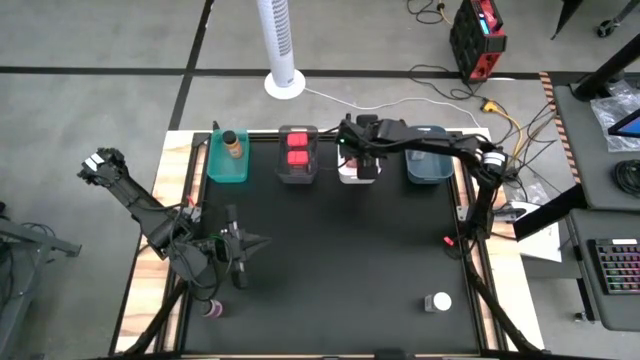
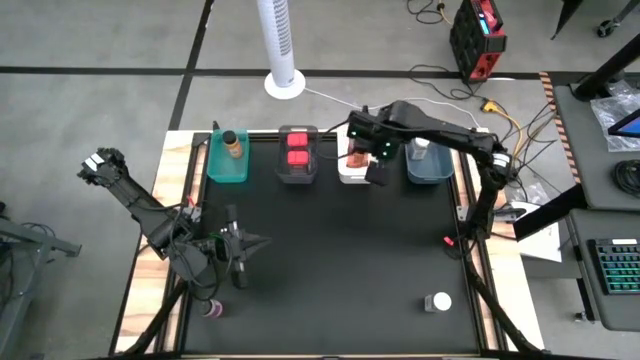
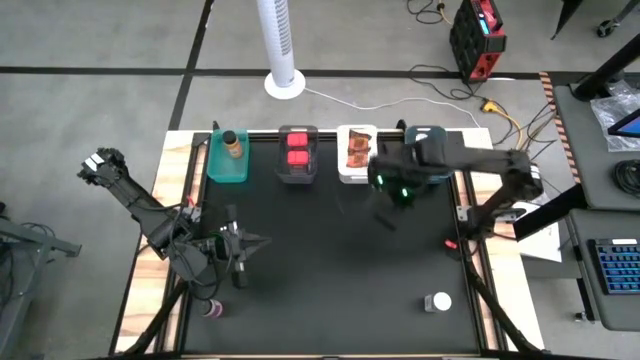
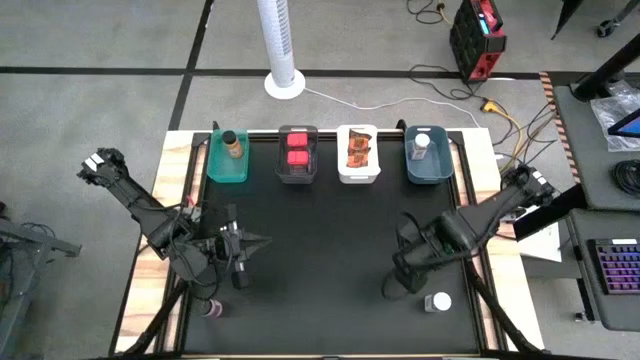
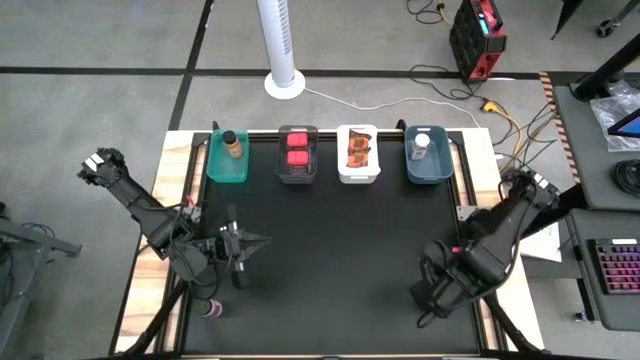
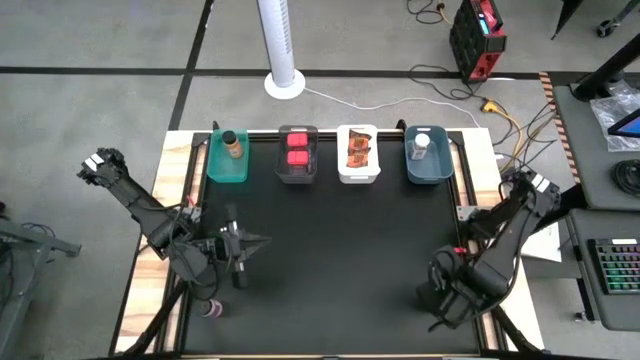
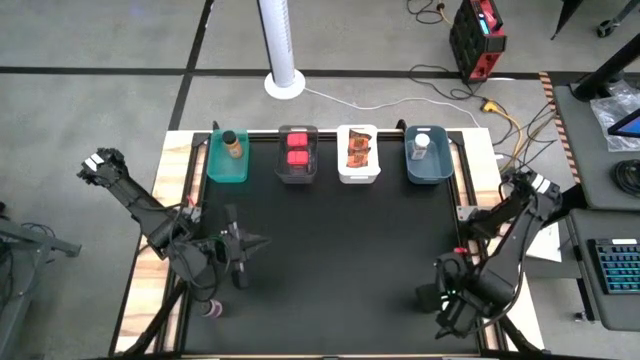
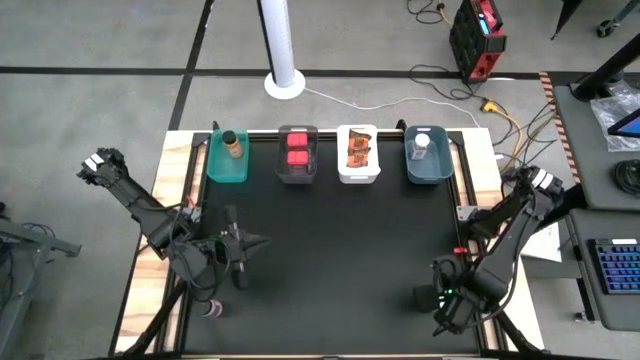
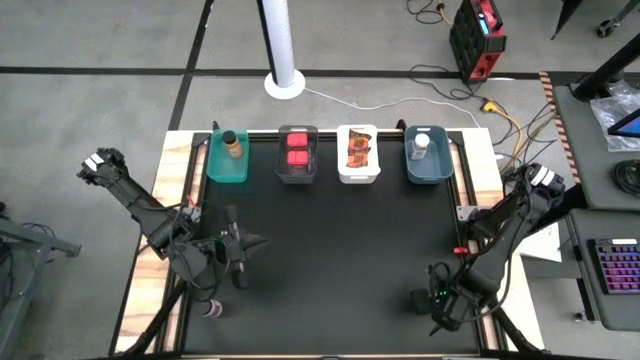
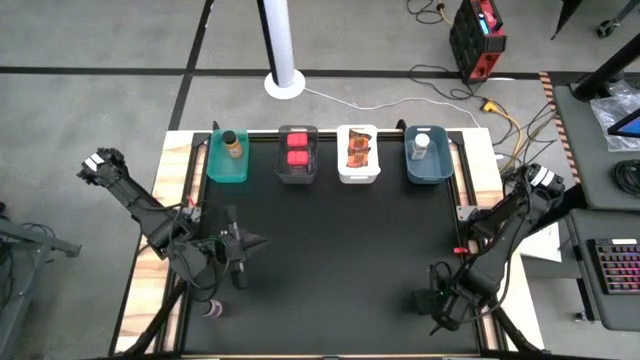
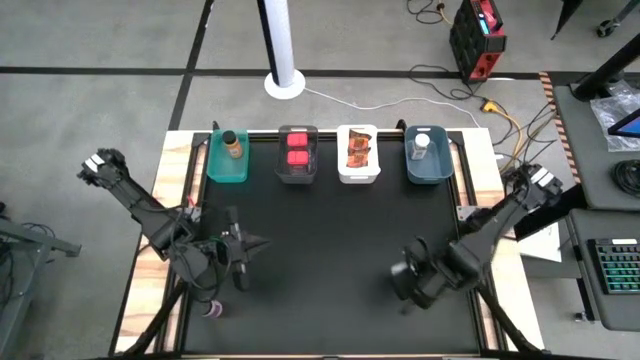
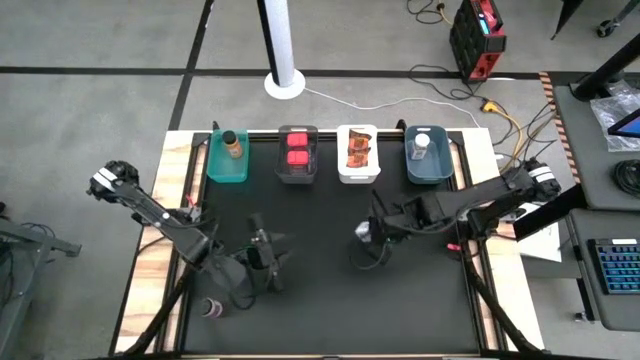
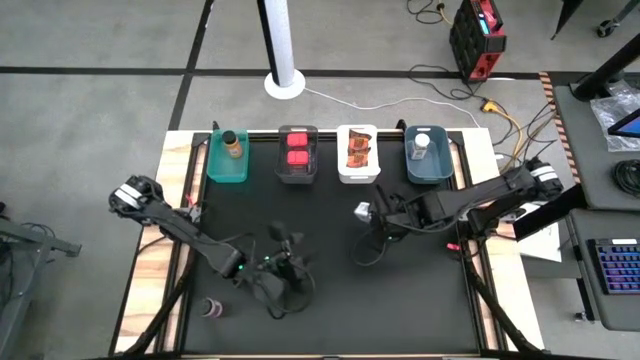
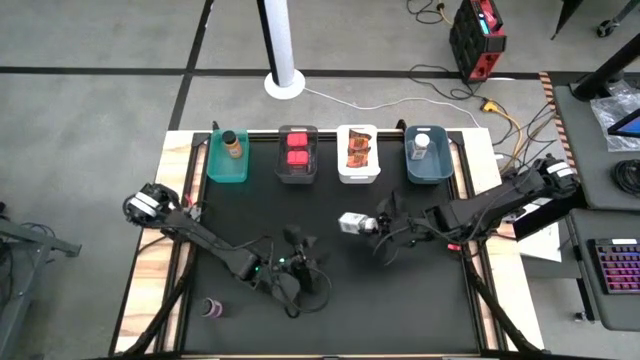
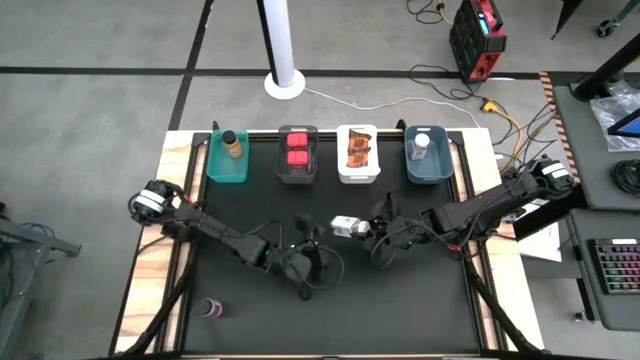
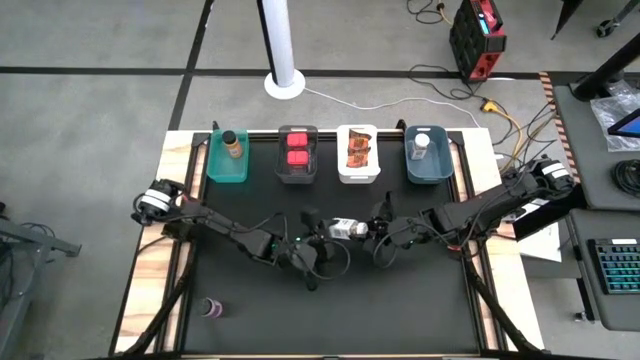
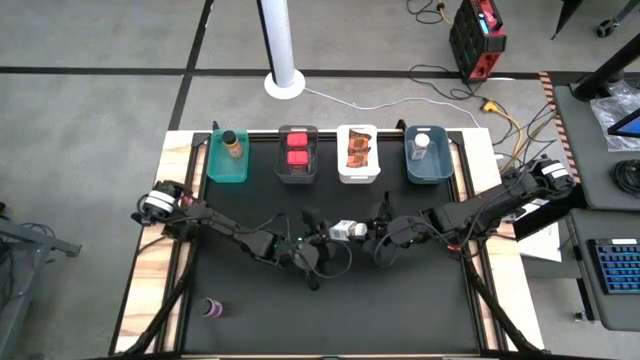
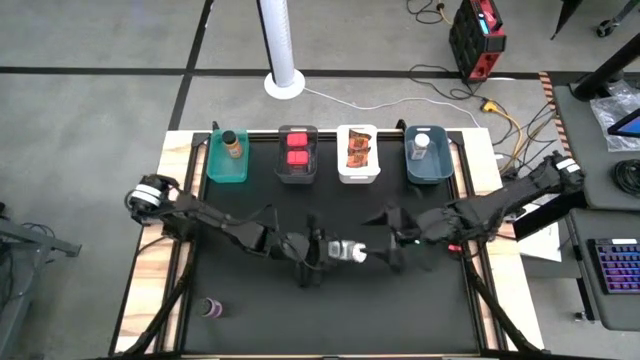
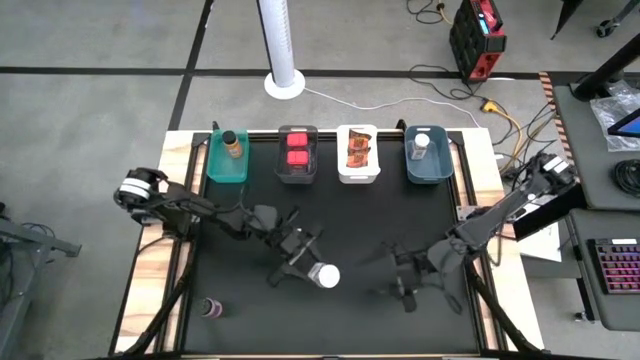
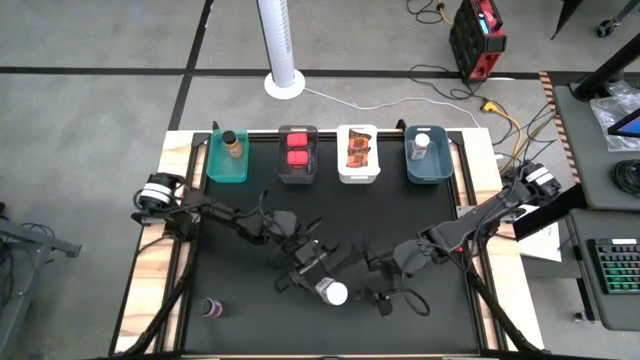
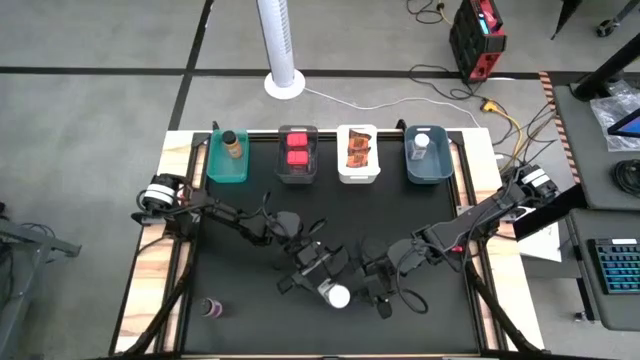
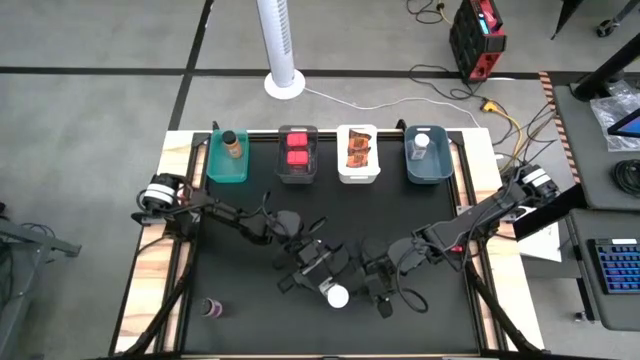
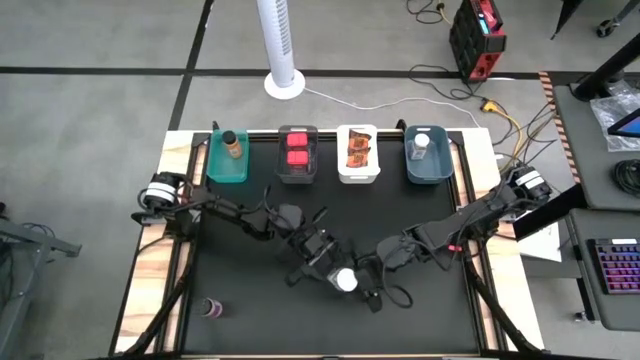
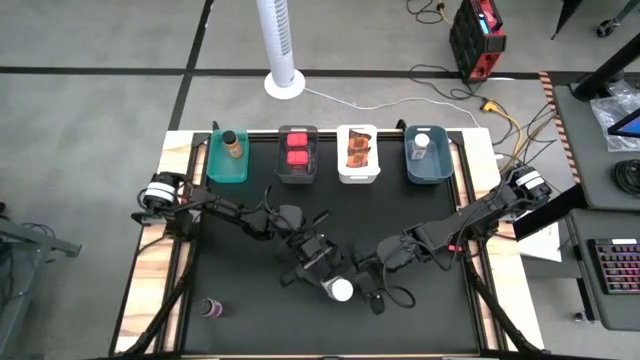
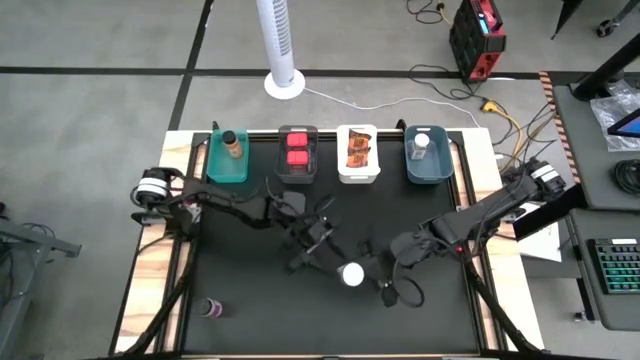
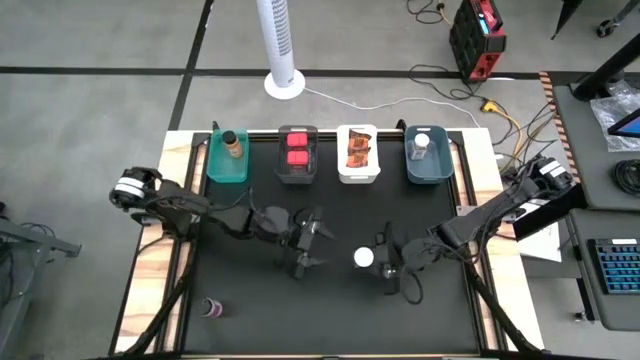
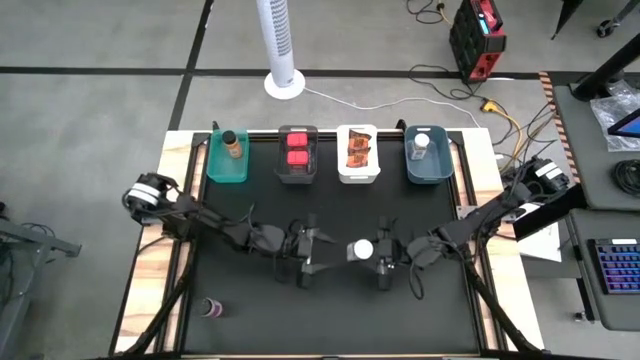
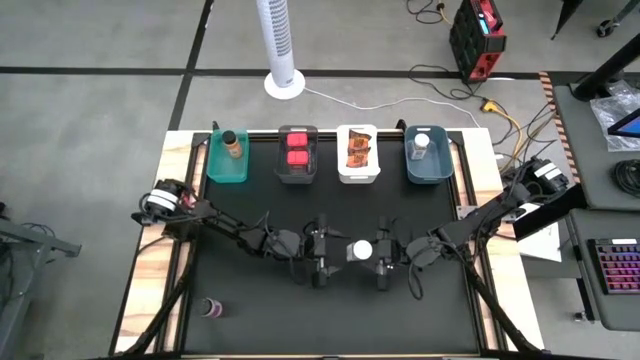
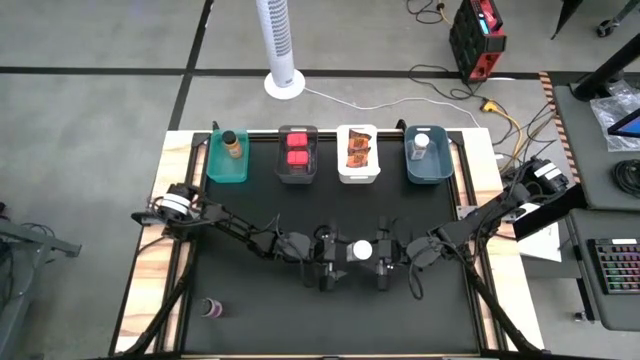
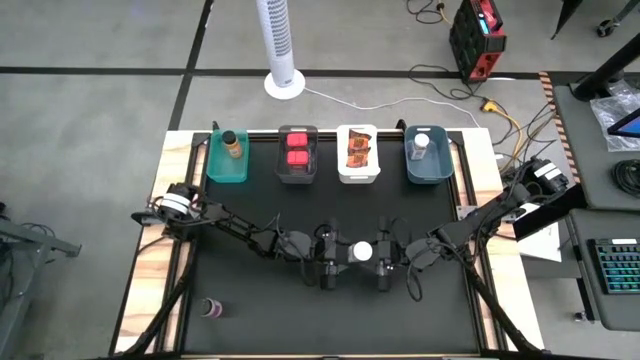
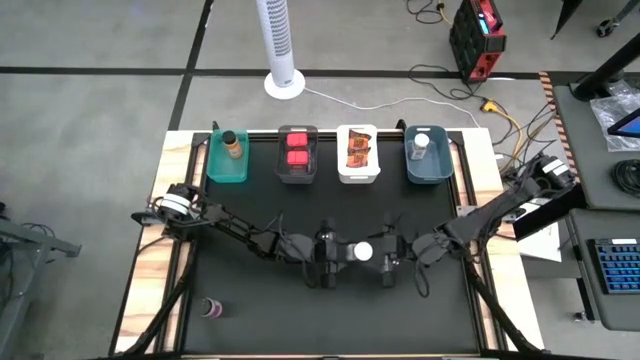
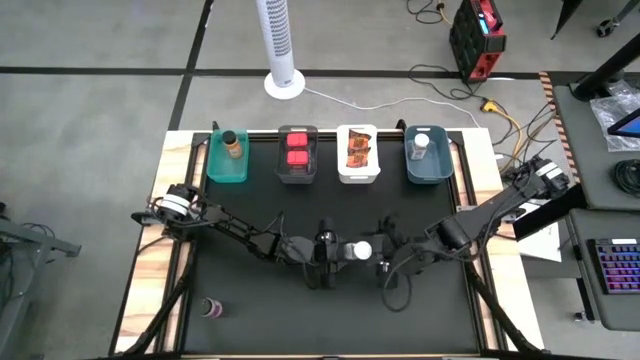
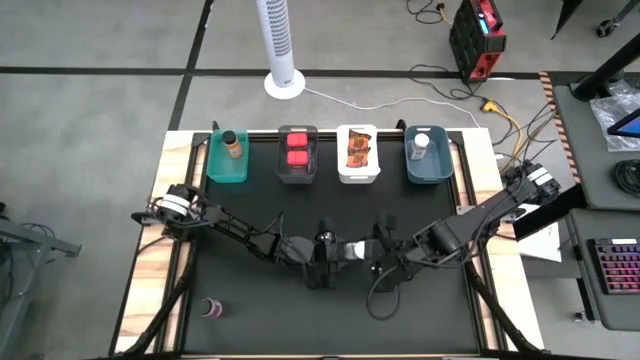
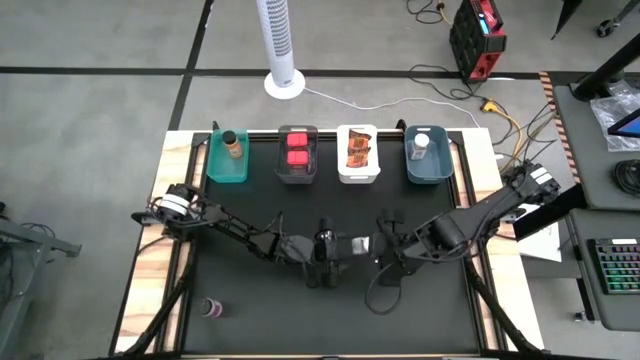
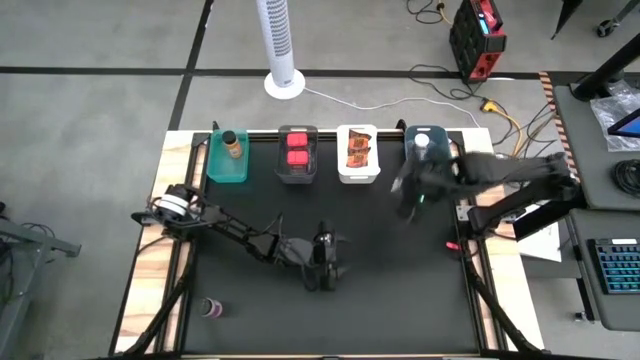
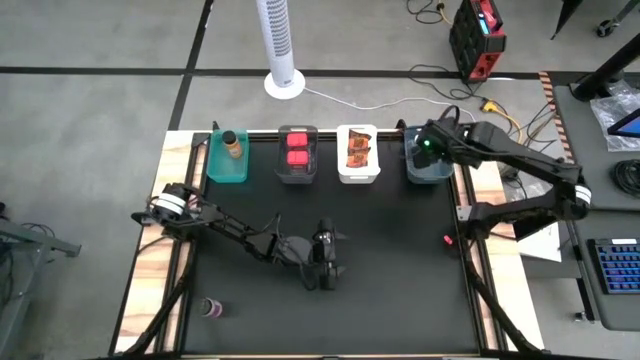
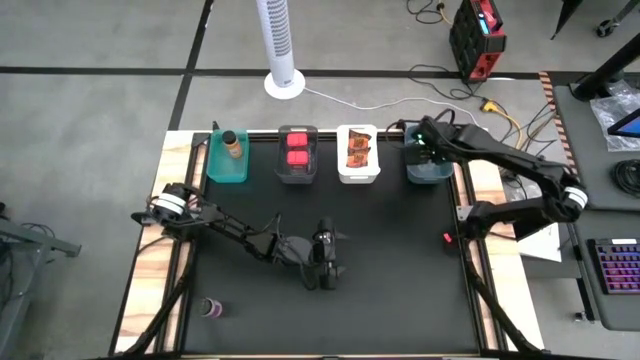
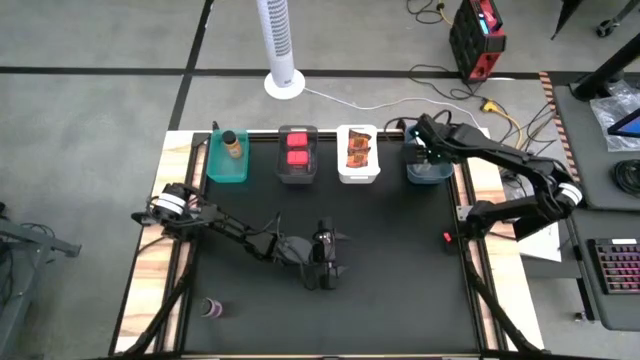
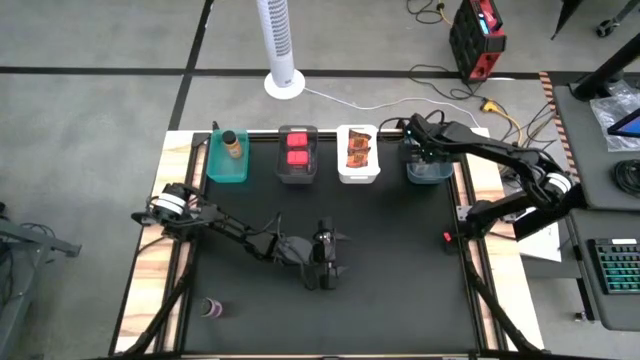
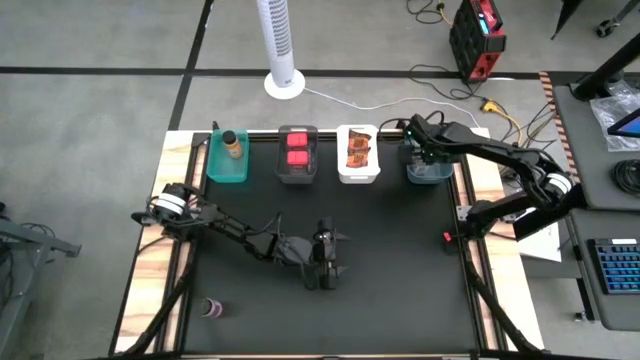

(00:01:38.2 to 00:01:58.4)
Task: Sort spices by type
Put the white seasoning bottle into the blue bin

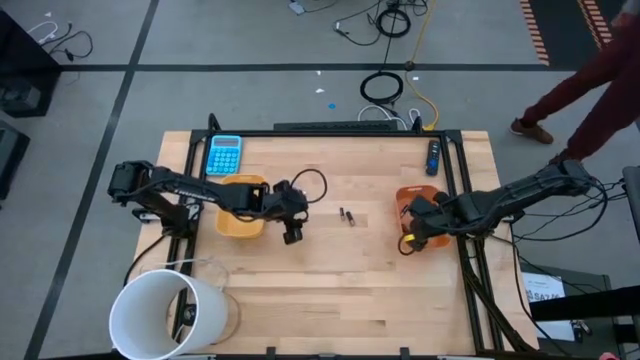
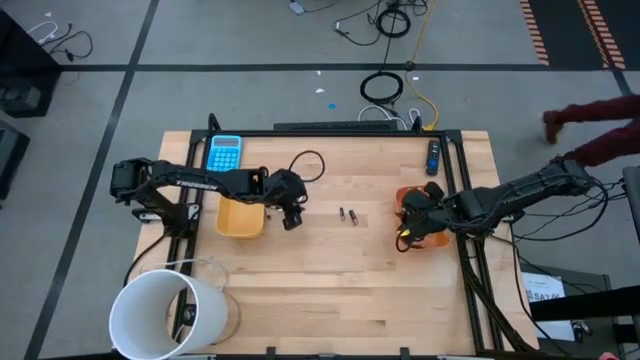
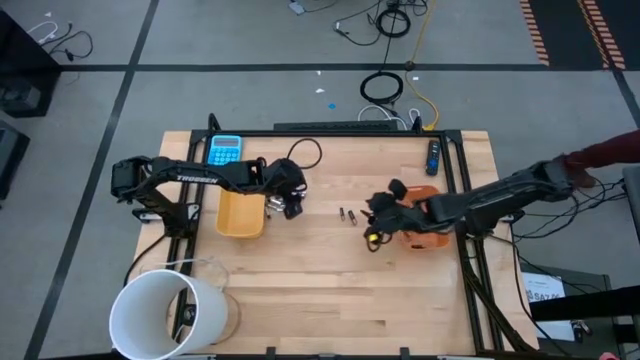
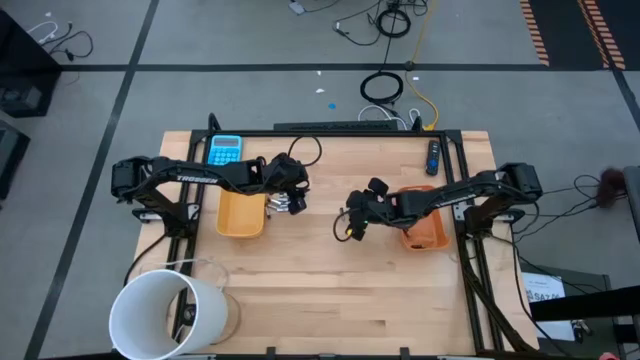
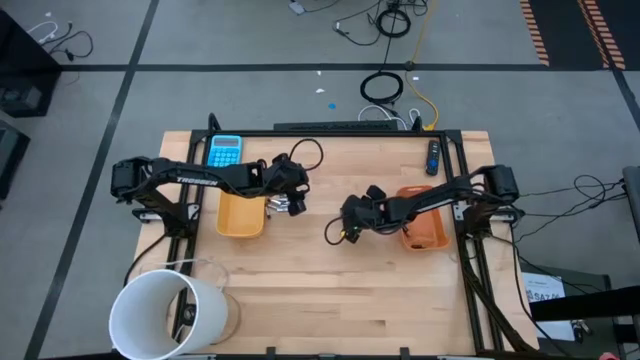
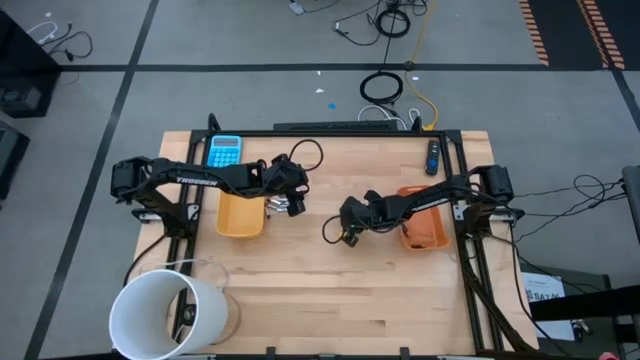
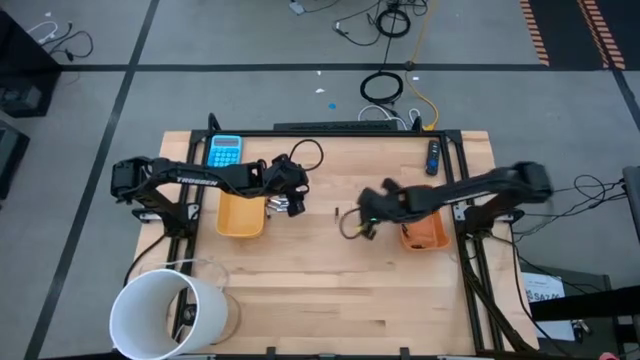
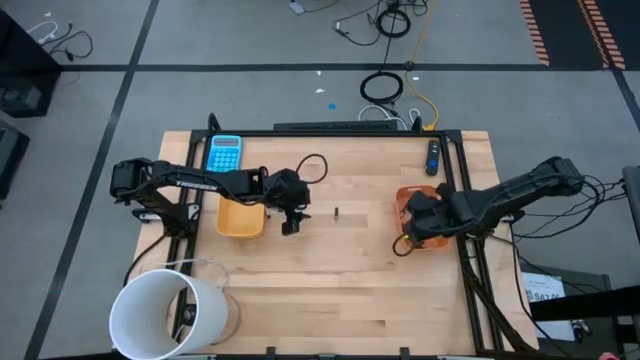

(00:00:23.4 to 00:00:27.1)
Task: Sort batteries
Put the black battery into the orange bin
